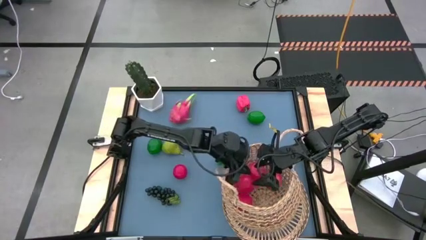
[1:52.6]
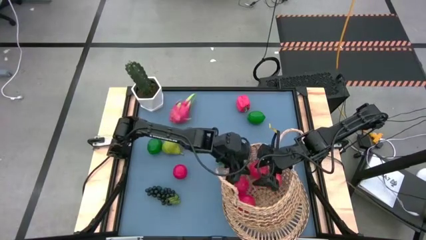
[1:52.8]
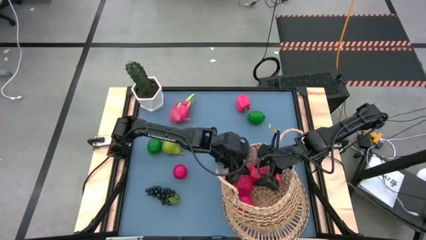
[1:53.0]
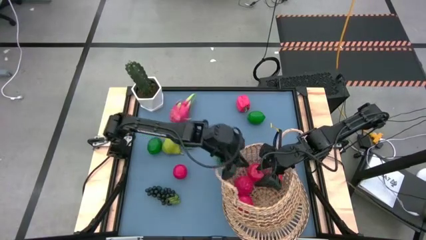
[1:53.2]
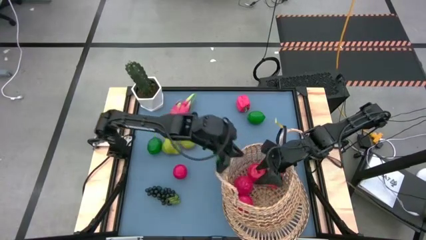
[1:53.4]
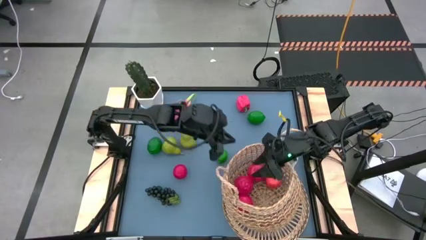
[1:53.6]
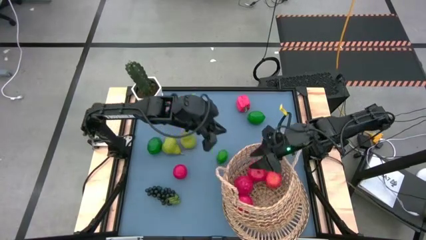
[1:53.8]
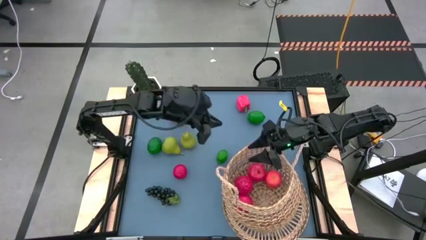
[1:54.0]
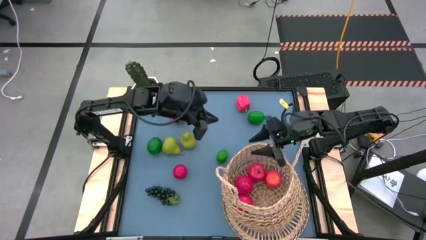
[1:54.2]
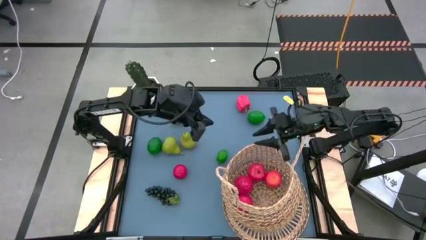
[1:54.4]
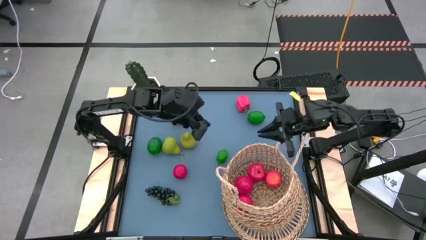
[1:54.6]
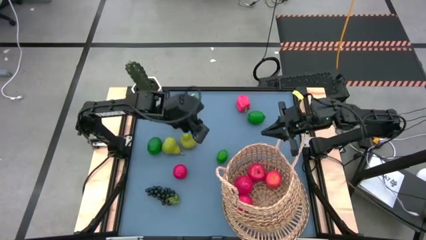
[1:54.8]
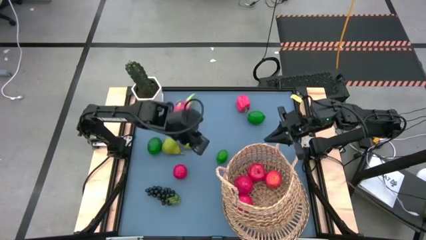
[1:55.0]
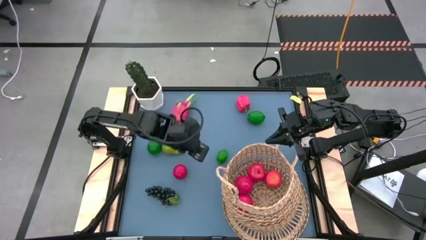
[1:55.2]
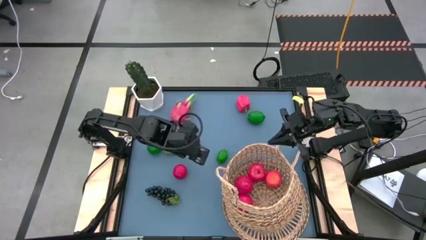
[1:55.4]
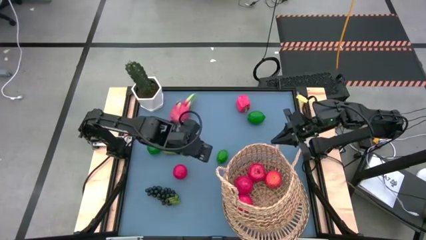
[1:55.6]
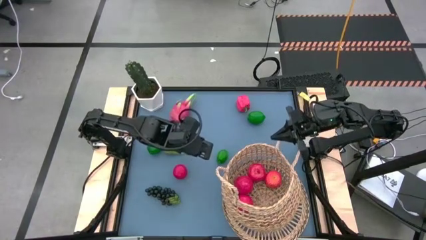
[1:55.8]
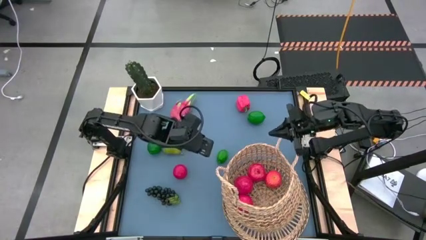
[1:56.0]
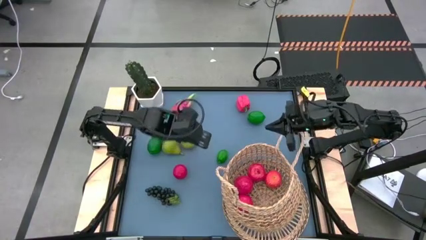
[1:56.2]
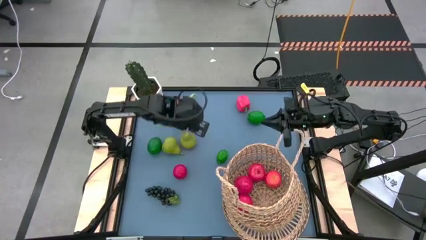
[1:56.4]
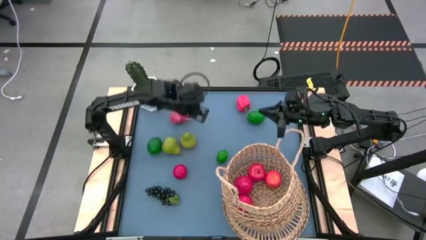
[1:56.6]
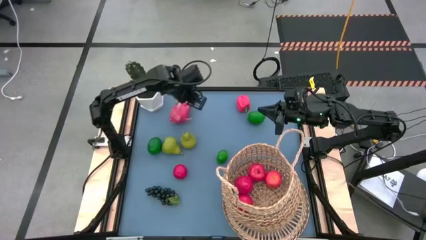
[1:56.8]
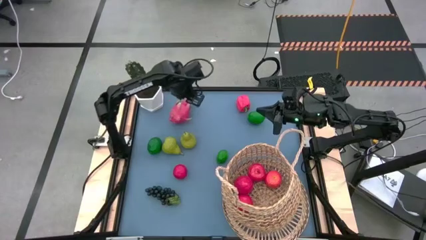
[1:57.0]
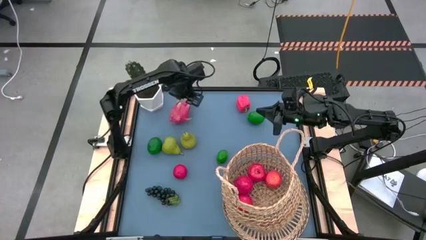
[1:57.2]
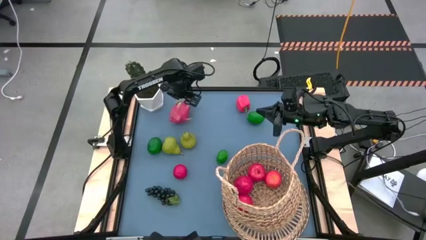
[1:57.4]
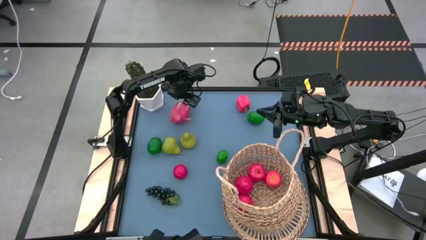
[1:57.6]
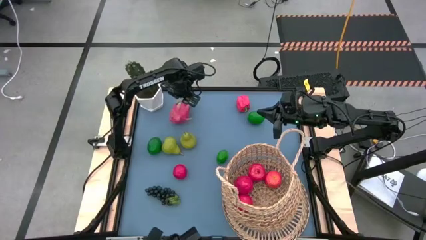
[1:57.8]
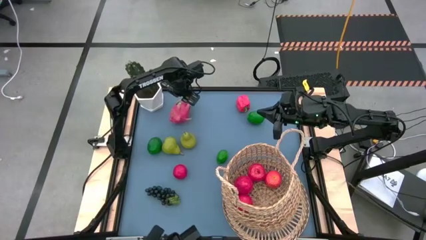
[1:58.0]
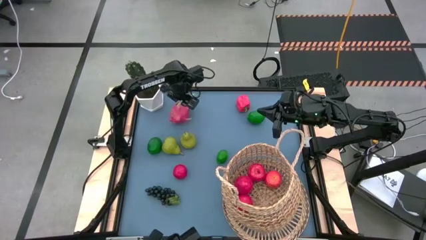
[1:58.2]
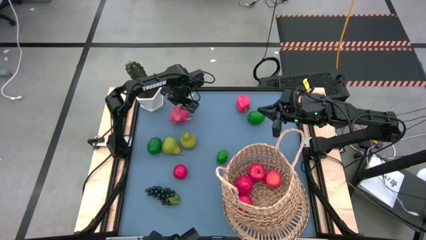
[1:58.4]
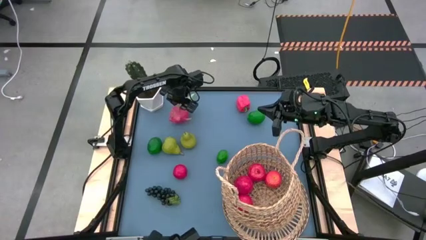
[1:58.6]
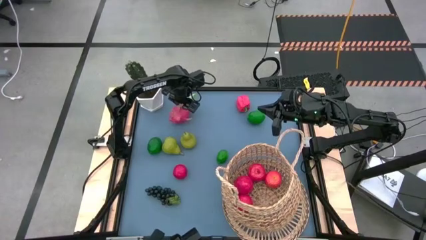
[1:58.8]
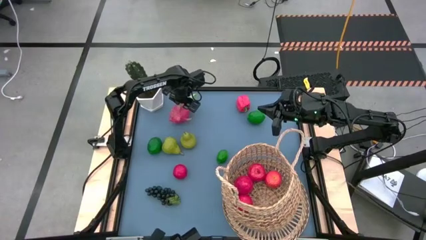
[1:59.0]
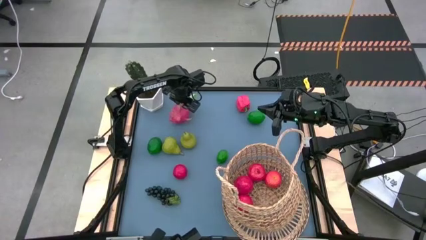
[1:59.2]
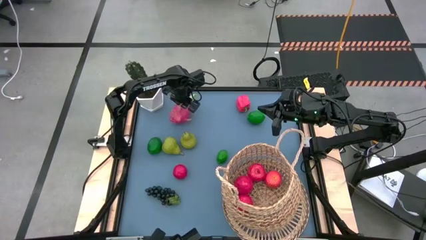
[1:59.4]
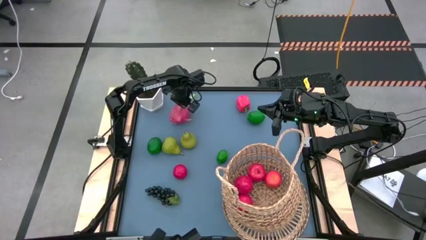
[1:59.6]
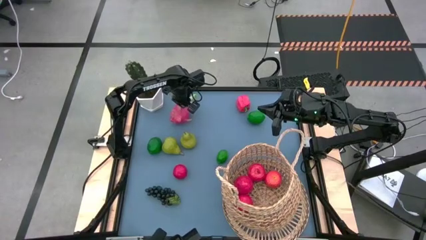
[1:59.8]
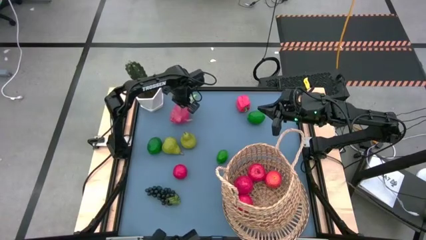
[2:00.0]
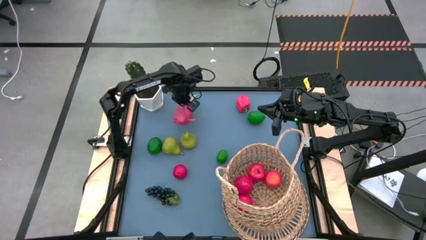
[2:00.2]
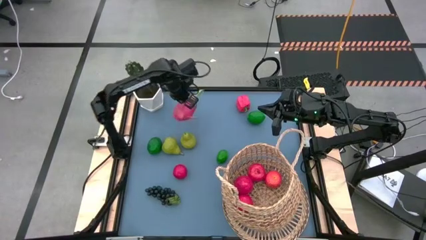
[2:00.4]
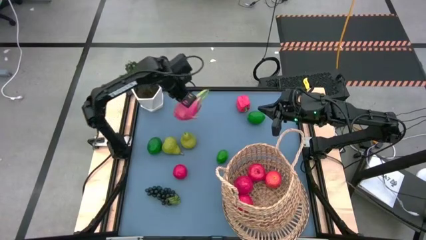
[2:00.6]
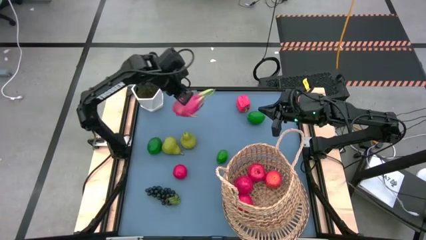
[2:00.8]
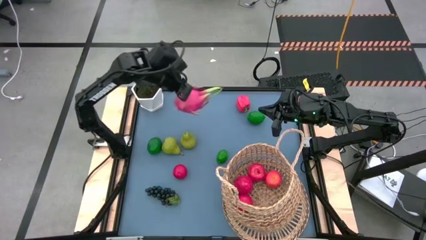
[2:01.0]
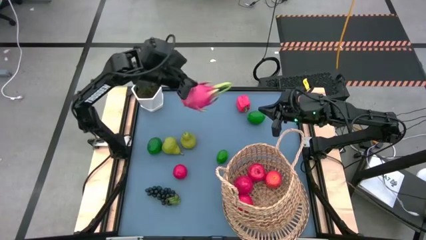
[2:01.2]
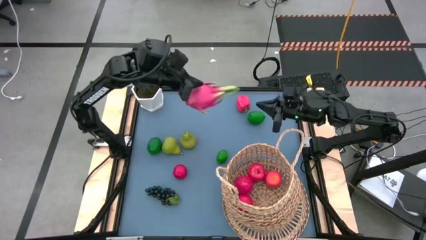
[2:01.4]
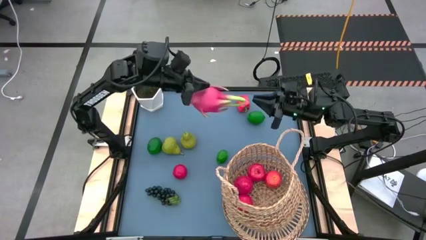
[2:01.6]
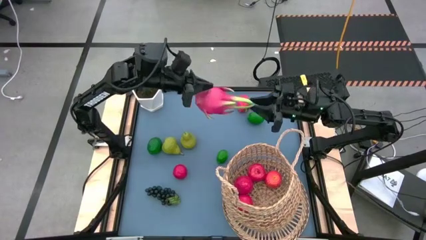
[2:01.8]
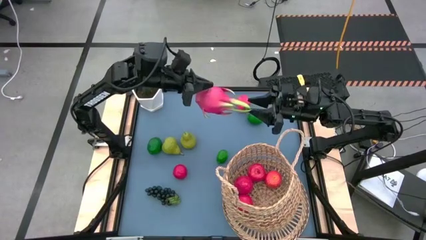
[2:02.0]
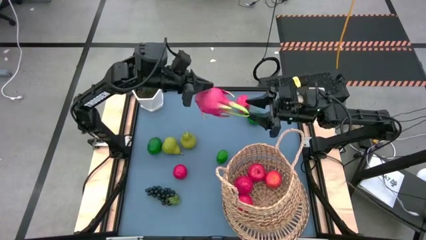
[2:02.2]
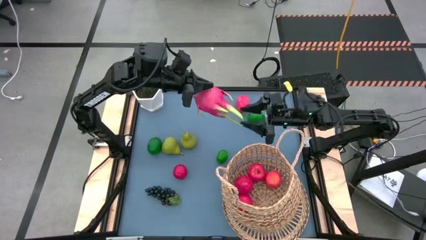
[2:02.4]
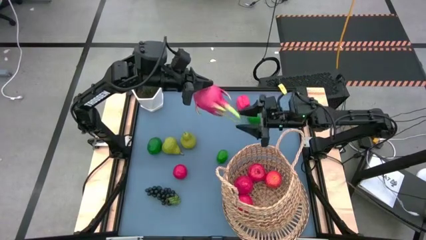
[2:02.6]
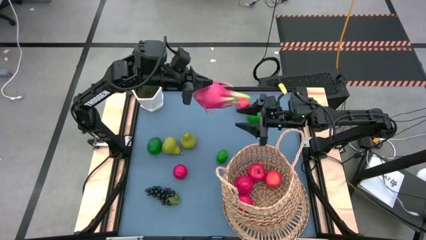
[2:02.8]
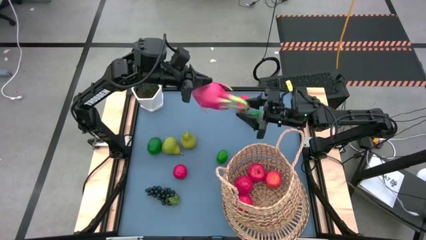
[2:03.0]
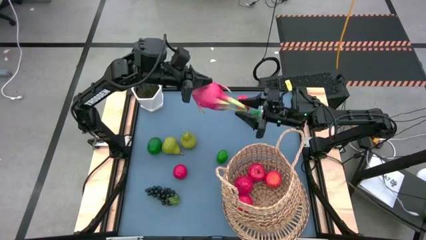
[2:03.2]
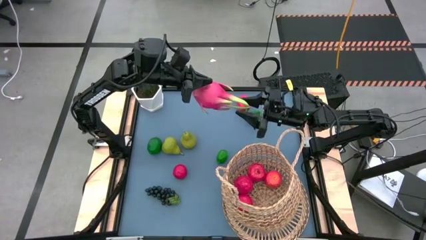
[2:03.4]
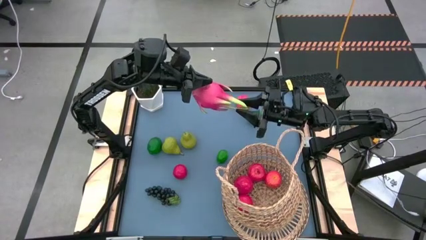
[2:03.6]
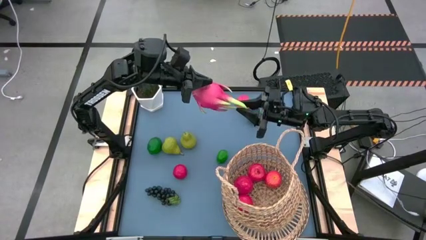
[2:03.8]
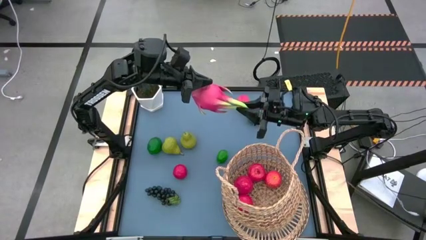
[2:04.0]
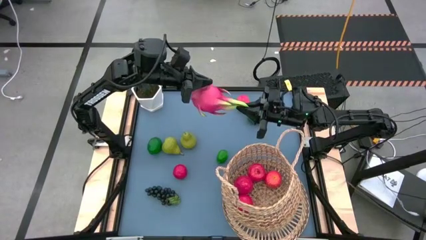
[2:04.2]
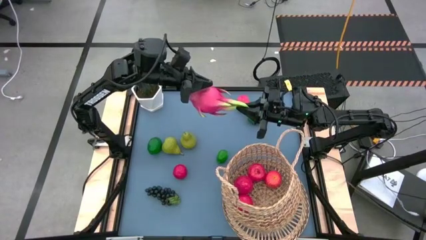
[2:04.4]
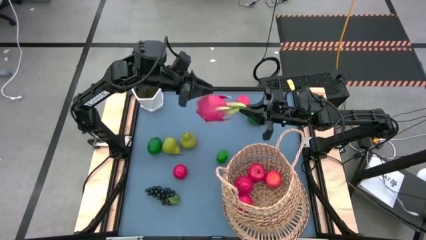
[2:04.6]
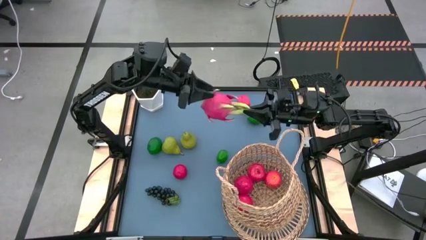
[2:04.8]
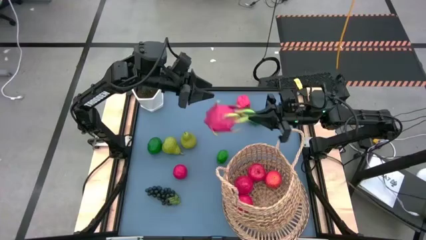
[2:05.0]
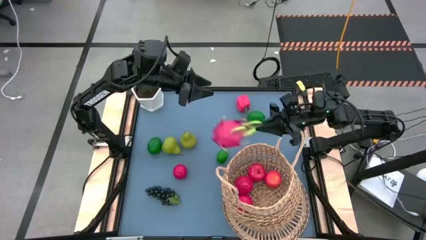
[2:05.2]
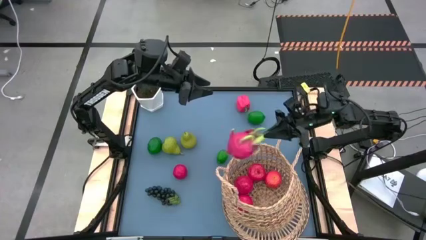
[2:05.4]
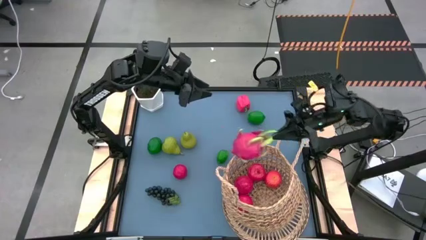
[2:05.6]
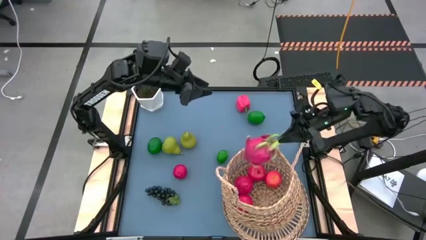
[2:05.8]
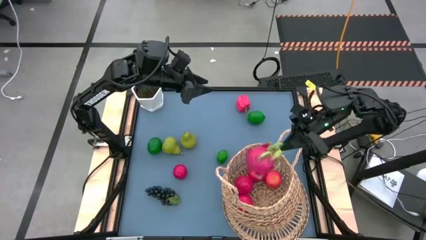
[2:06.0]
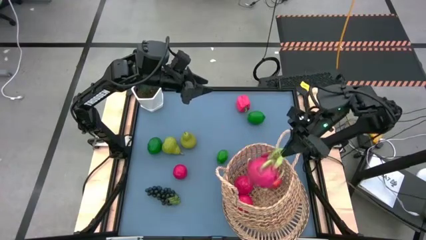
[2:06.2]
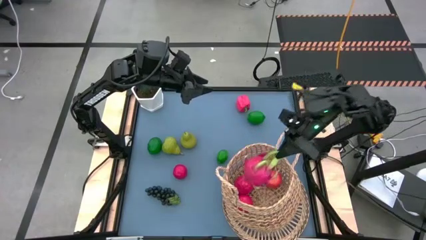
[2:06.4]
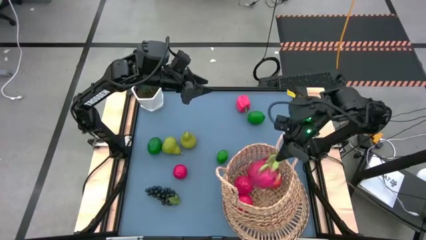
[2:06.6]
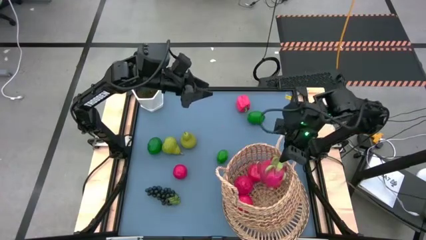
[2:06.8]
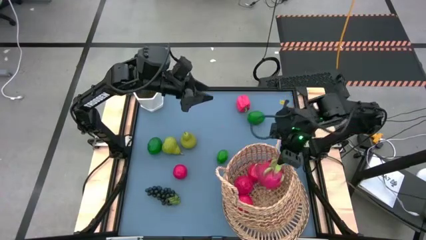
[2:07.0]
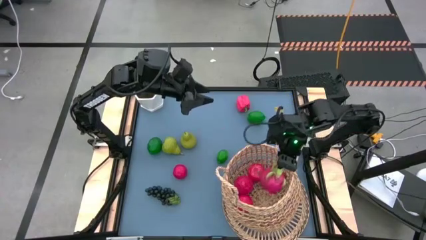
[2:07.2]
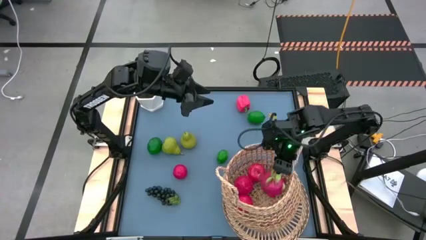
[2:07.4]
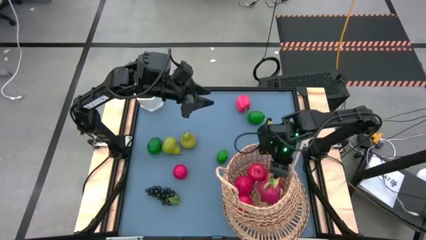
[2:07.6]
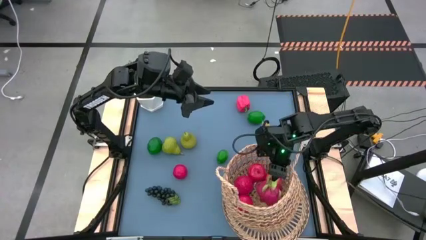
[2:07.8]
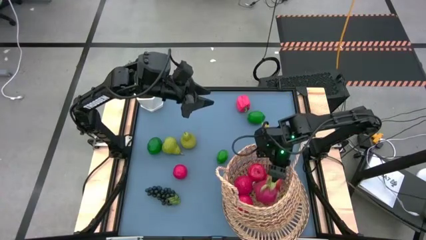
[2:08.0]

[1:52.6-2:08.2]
Task: Build produce basket
Put the pink dragon fruit into the brown basket

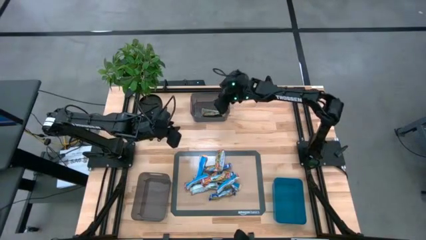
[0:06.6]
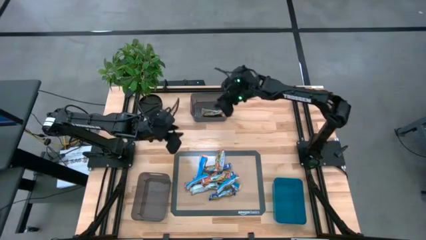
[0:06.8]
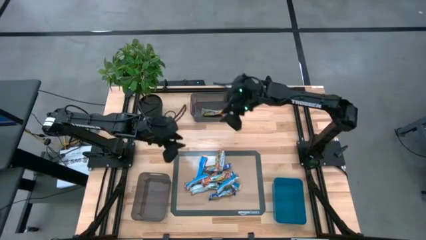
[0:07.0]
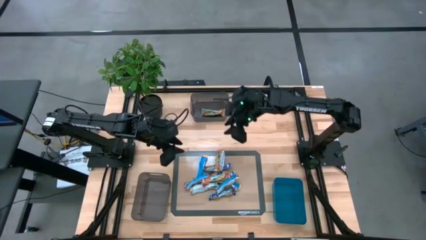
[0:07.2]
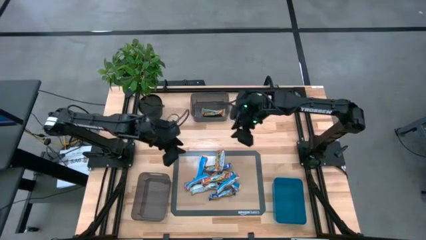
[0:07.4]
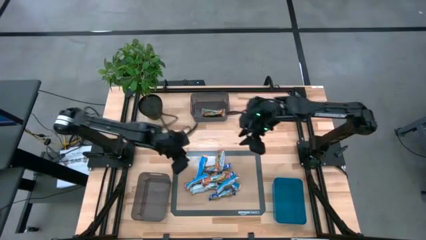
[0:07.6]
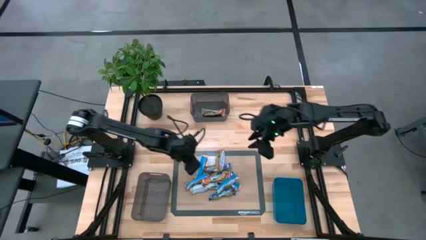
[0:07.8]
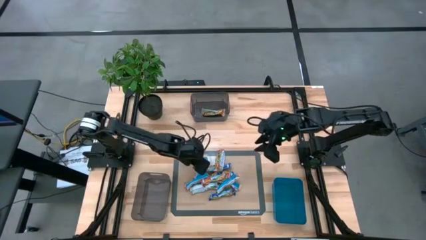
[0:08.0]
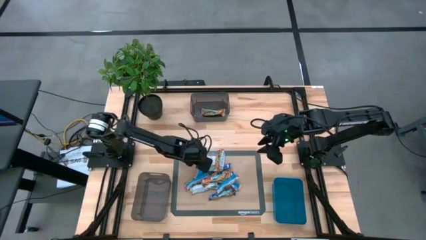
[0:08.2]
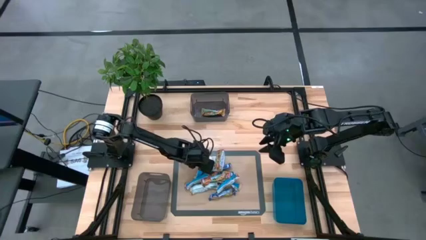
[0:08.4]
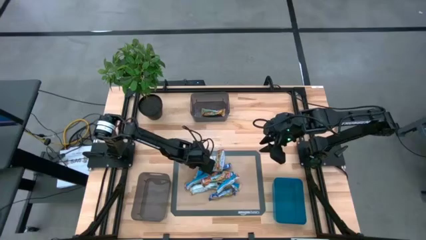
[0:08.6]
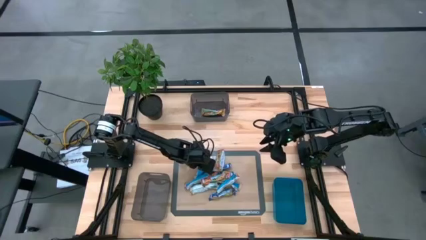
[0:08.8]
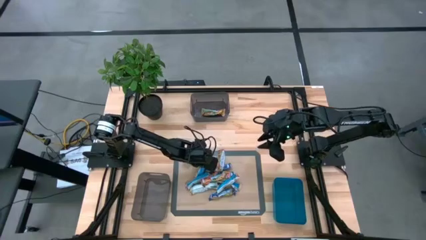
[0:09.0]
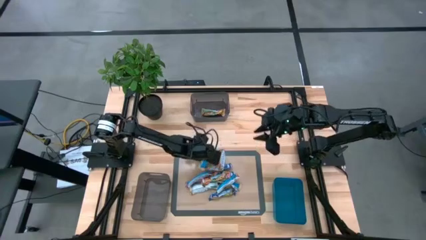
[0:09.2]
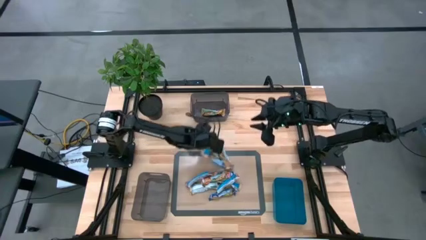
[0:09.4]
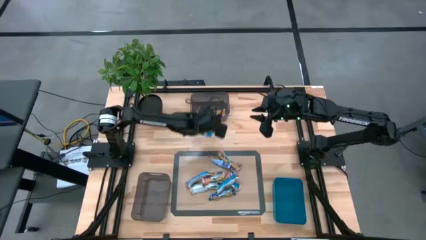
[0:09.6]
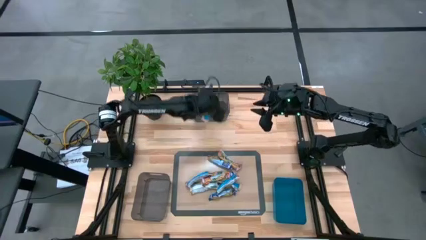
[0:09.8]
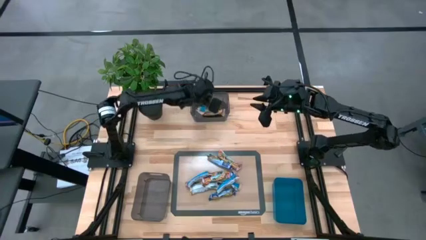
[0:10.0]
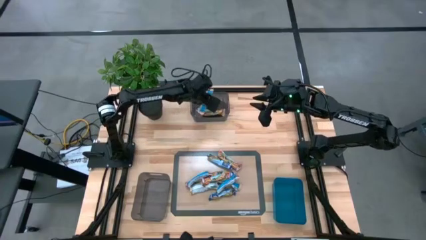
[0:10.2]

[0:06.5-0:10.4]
Task: Pick and place Granola Bars by type
Put the yellow granola bar into the top black transparent bin
